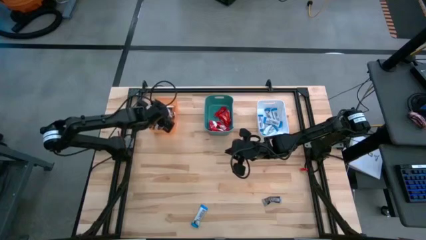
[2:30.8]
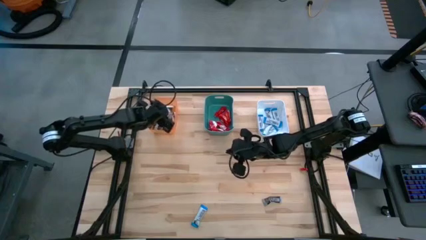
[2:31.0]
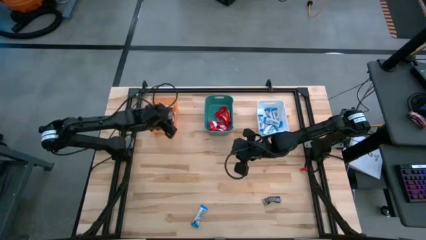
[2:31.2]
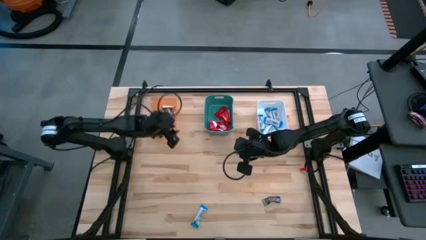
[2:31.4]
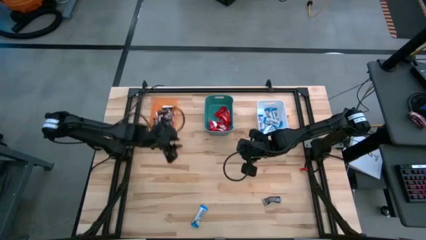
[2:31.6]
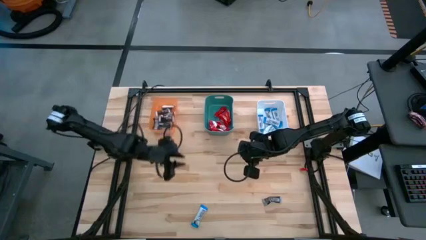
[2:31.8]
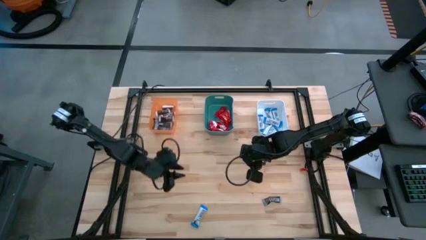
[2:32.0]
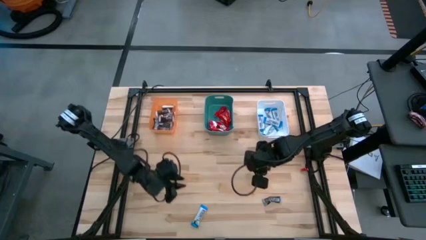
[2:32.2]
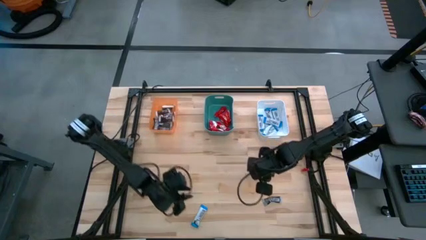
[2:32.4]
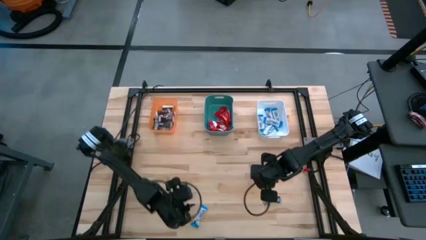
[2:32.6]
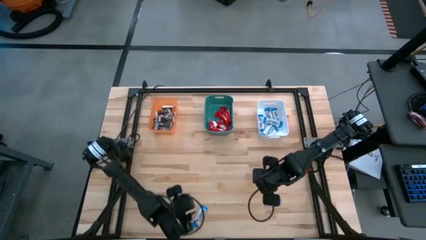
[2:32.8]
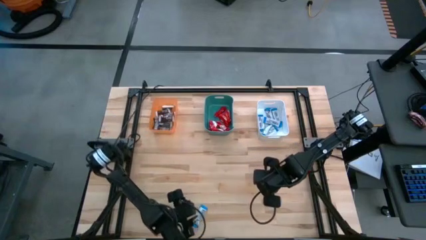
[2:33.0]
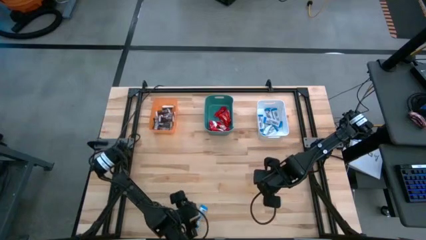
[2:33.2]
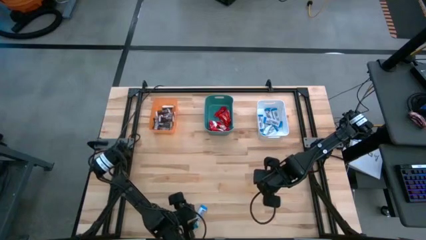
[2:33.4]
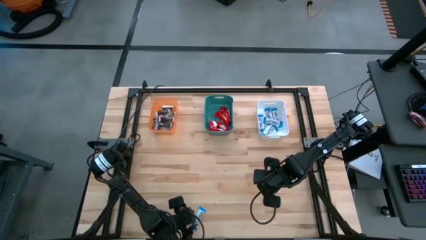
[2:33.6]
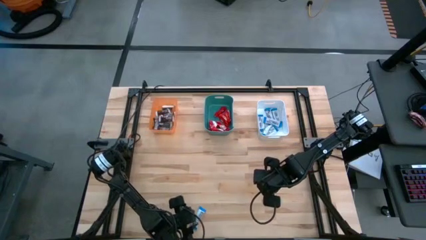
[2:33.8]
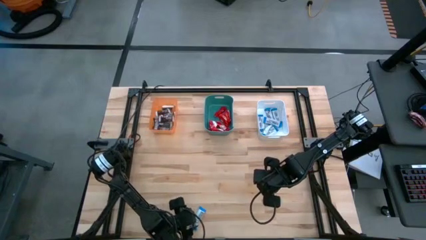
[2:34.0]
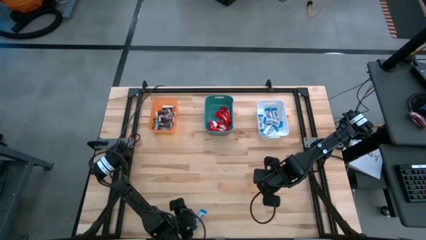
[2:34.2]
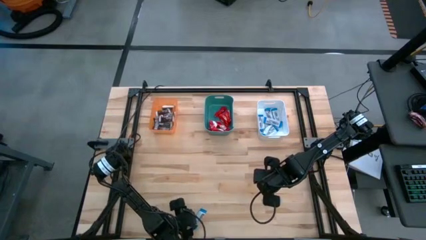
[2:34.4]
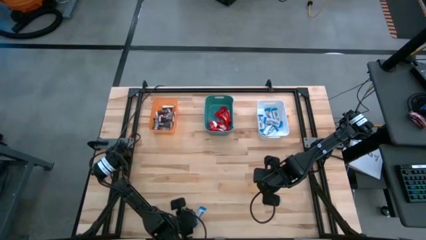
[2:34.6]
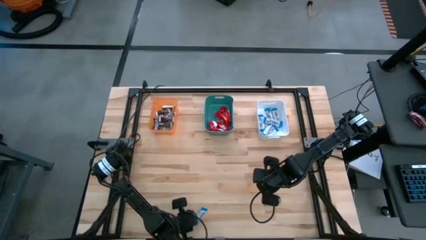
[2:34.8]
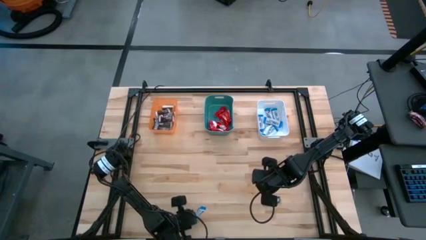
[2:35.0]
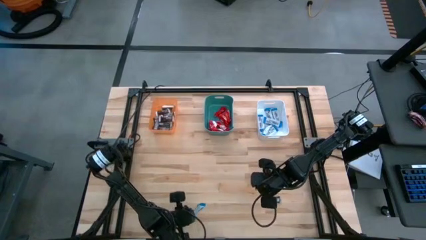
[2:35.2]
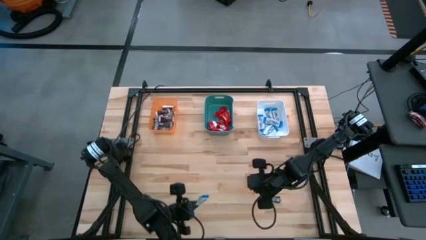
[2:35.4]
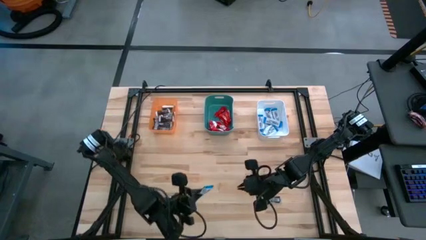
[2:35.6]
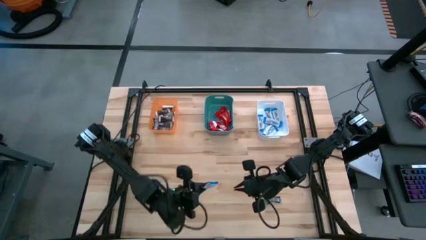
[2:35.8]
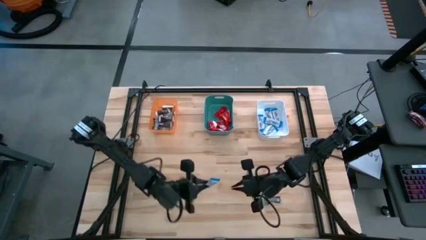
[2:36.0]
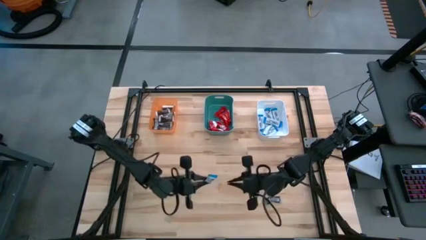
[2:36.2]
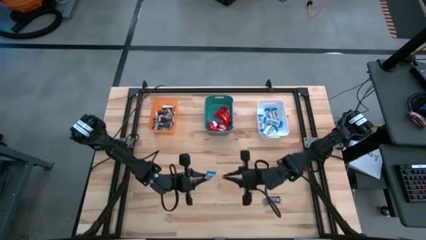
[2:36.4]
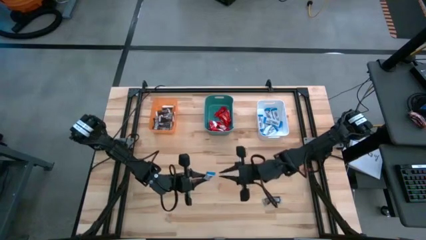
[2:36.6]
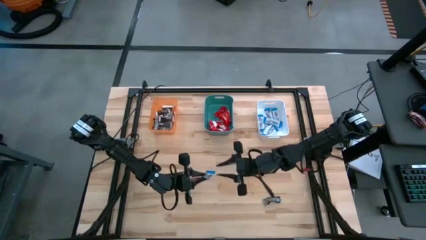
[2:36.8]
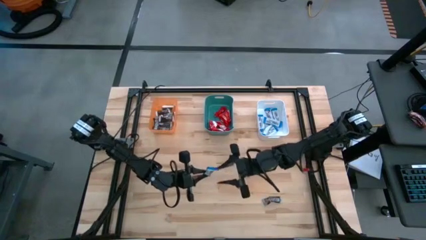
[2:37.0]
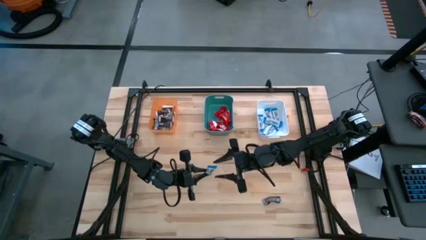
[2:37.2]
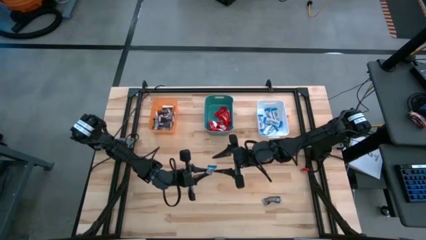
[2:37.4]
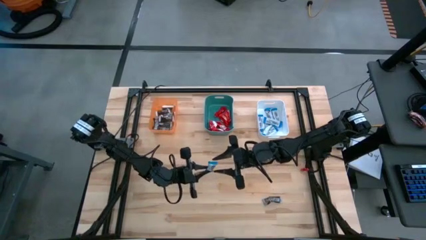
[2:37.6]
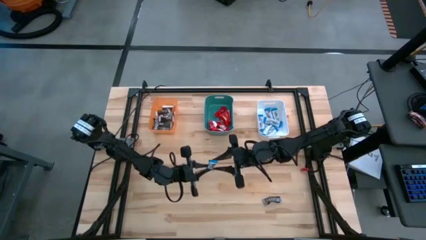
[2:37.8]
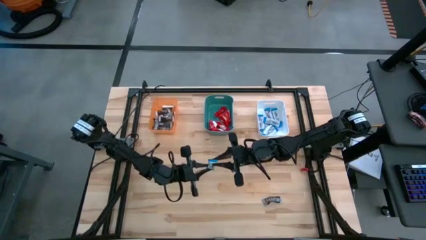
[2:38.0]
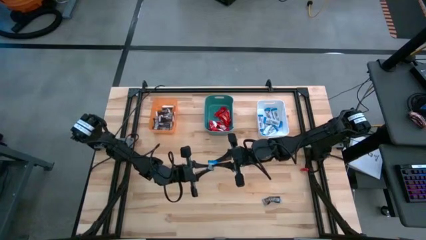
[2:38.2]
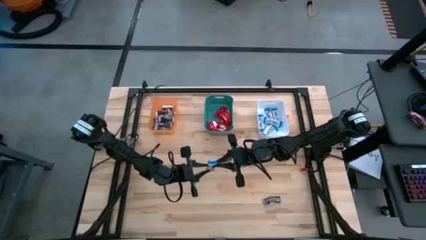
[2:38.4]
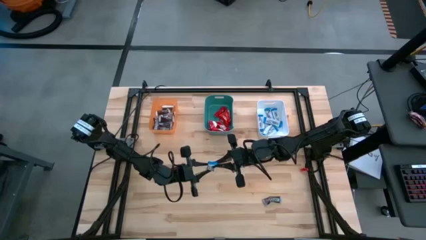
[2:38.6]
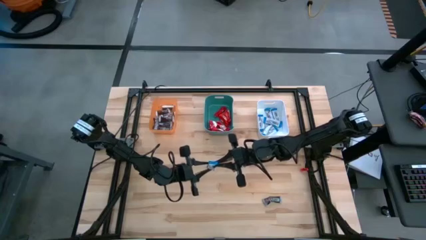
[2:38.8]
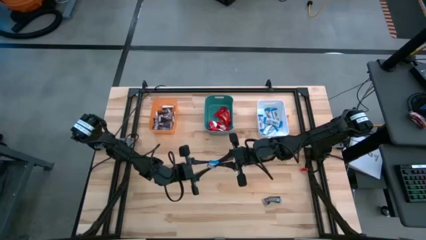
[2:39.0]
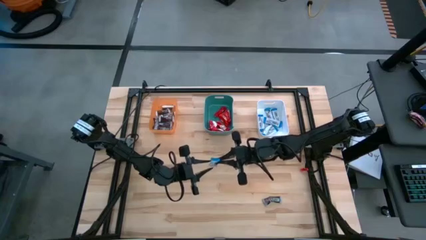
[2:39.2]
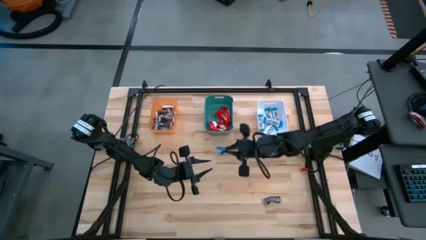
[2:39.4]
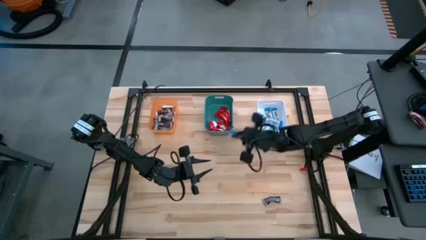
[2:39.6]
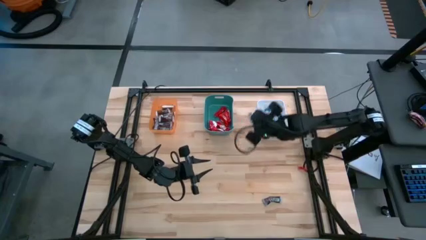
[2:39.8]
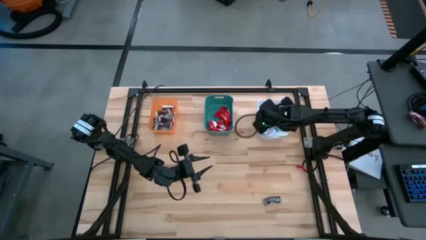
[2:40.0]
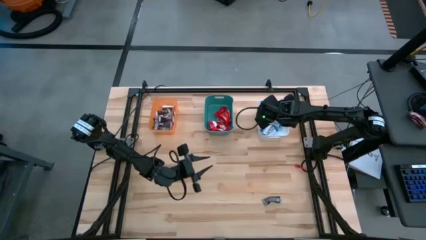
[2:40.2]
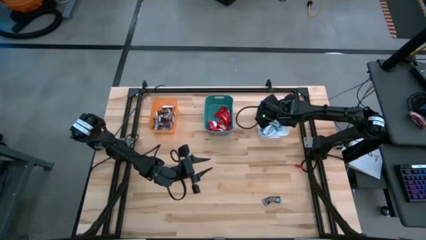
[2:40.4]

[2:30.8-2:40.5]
Task: Organize candy in baskets
Put the white chocolate bar into the white bin

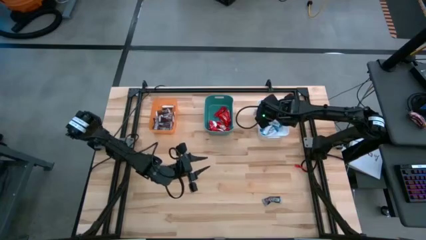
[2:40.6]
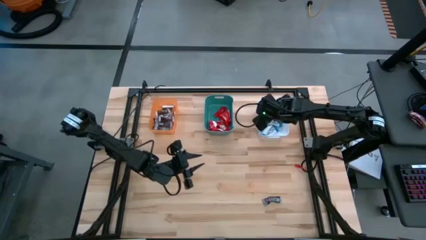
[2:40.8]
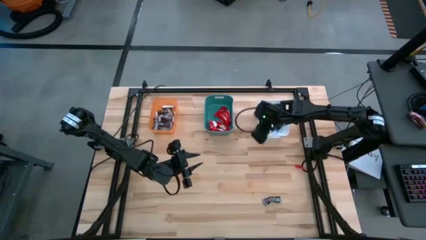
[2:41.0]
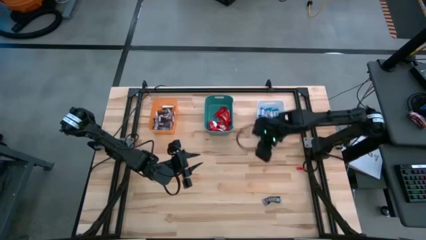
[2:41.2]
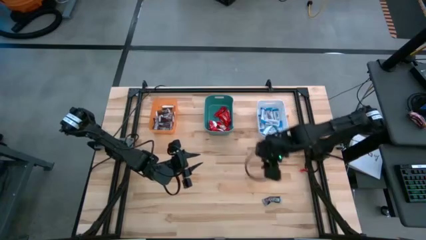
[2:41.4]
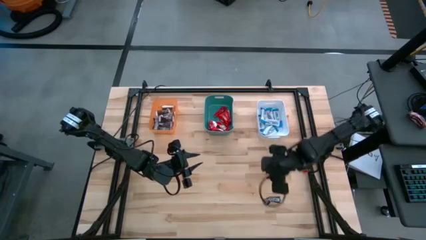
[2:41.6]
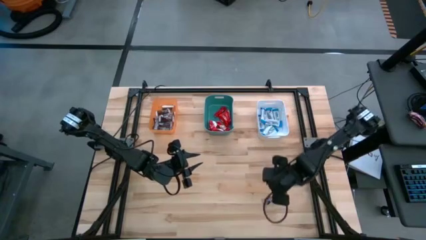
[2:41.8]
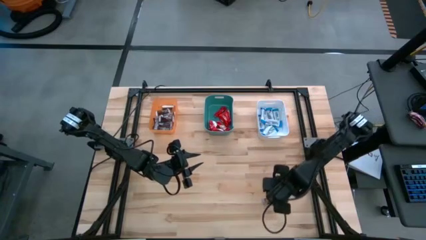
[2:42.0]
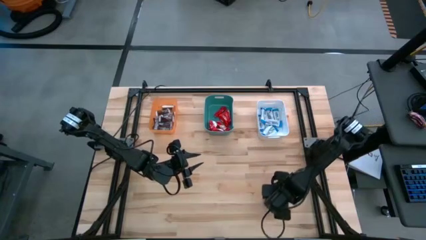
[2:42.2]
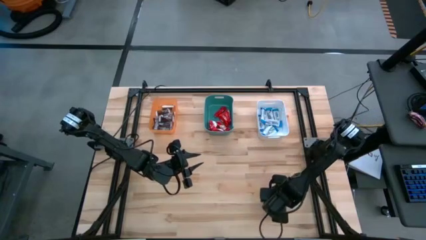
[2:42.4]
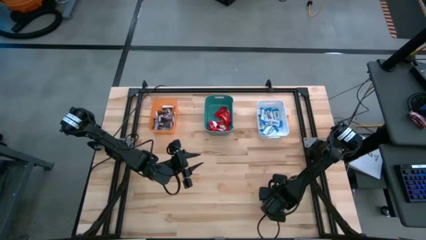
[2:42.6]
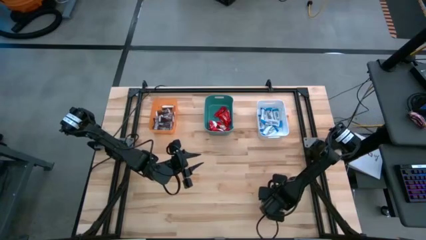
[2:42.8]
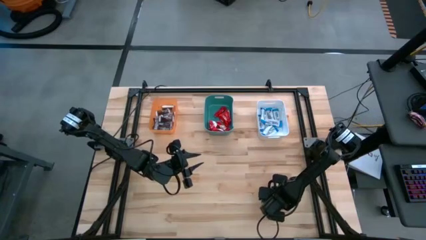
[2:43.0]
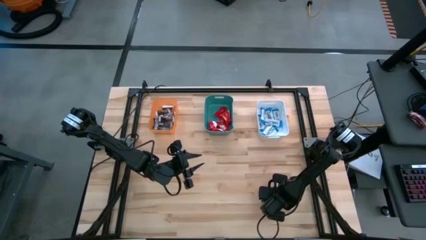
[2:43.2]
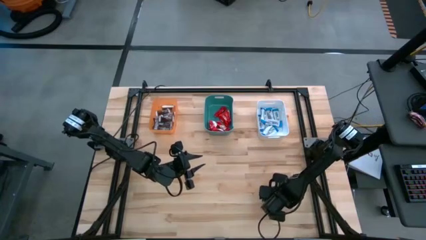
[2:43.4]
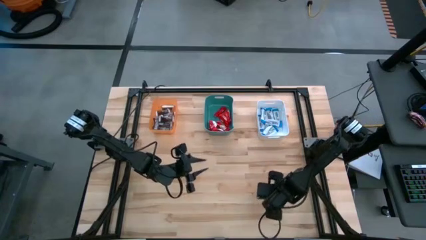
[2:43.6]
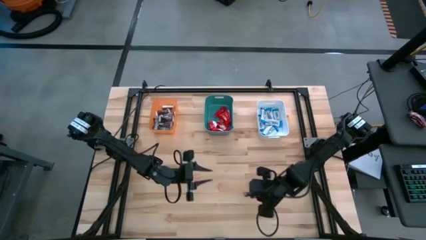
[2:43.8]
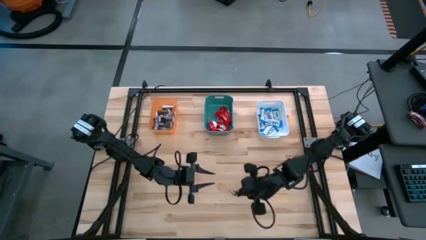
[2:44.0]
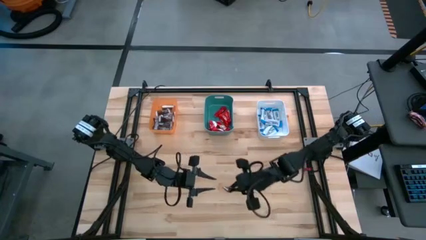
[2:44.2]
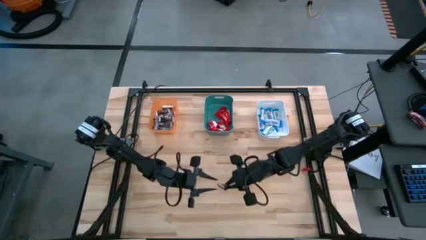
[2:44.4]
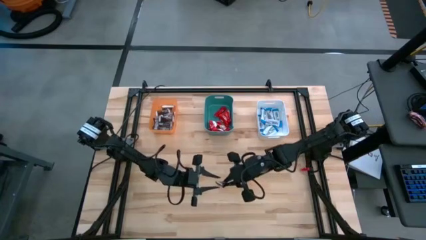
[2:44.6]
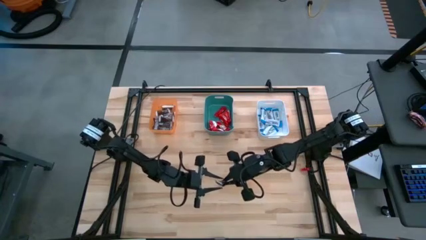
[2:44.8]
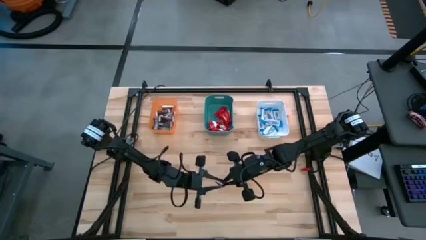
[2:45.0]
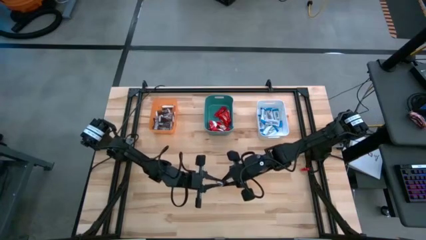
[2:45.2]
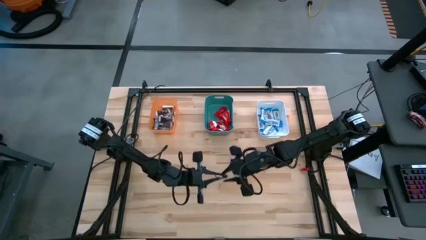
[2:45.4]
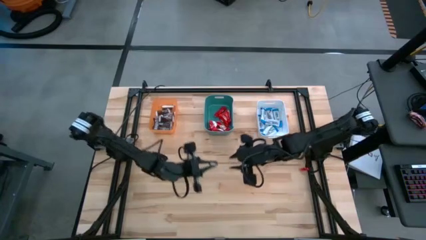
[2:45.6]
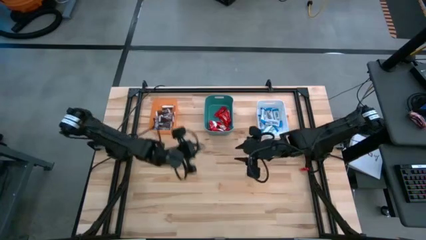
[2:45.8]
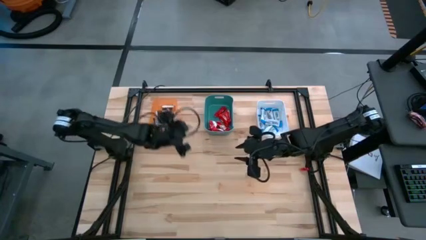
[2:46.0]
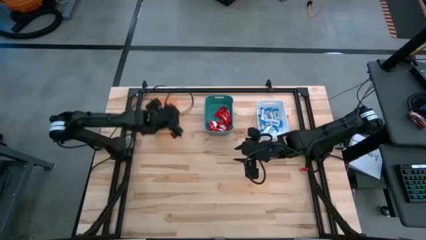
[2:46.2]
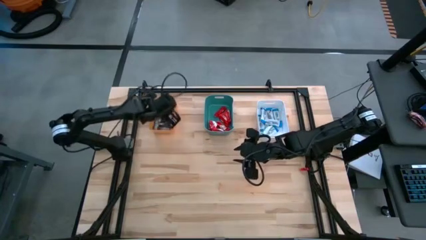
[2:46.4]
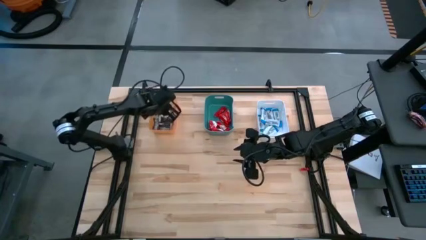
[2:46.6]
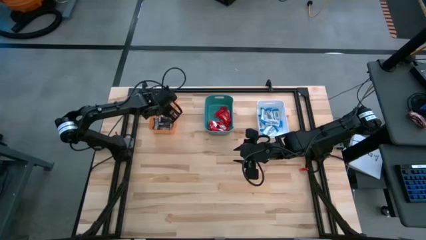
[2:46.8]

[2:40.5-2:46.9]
Put the black chocolate bar into the orange bin

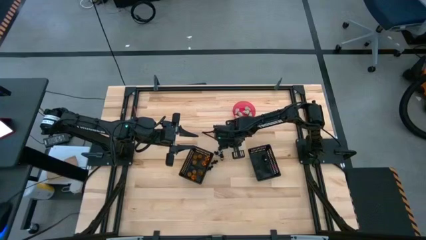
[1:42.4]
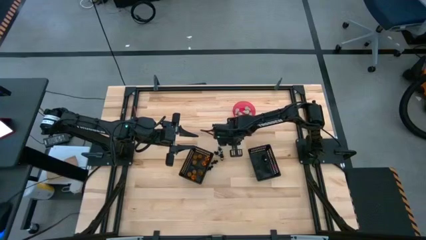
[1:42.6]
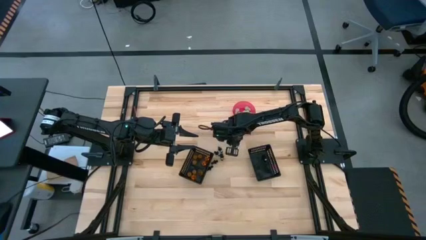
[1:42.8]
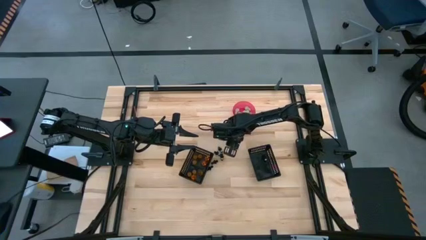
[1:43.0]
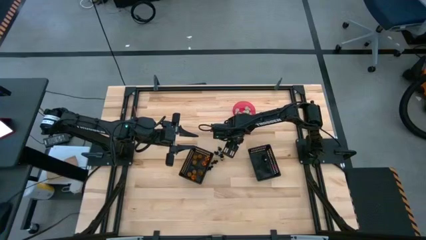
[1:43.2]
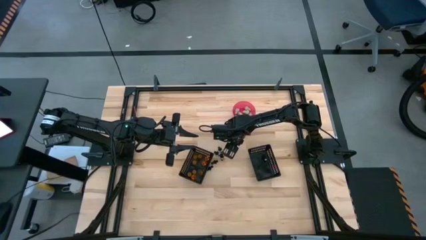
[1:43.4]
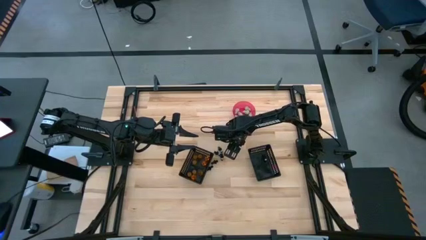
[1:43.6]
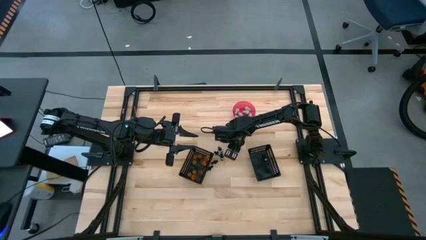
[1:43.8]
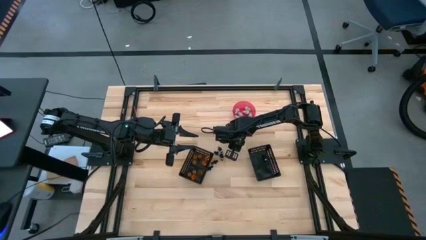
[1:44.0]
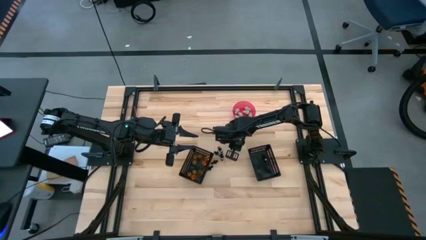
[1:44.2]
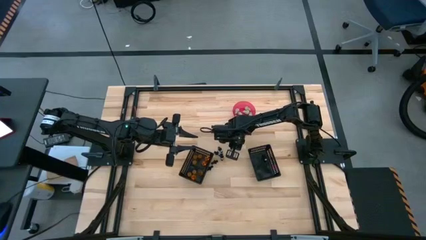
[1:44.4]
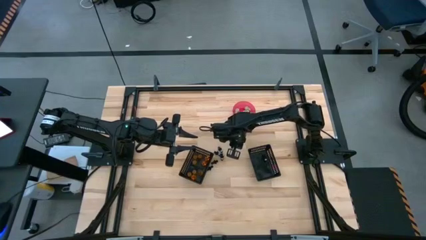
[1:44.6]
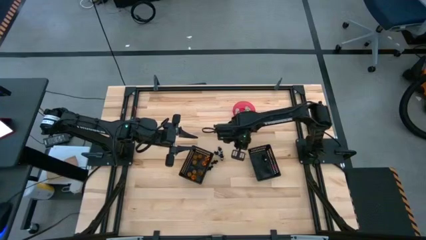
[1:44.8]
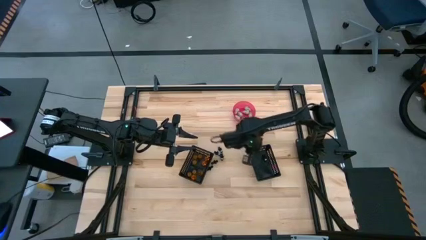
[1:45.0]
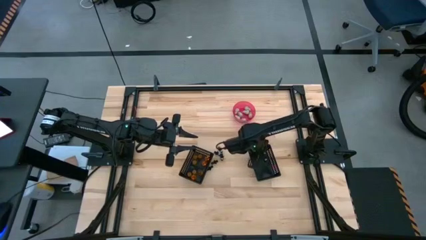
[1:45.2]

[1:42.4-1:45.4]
Task: Sort Halloween decoration
Put the black skeleton toy into the right black bin
